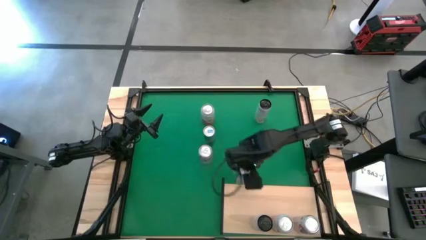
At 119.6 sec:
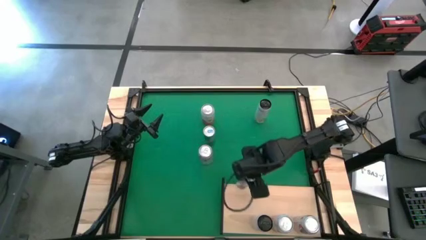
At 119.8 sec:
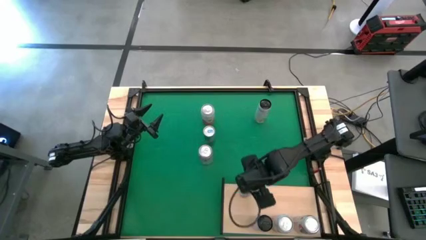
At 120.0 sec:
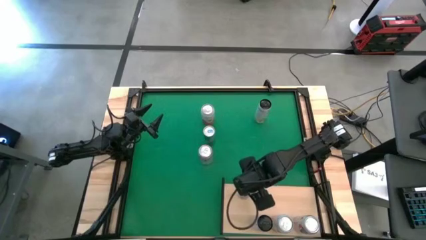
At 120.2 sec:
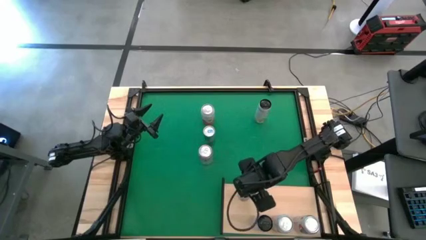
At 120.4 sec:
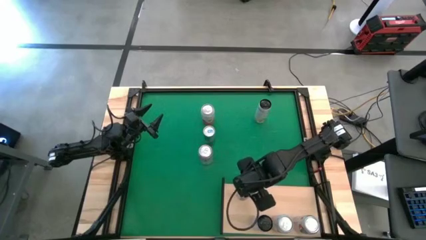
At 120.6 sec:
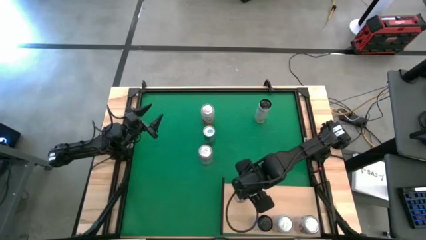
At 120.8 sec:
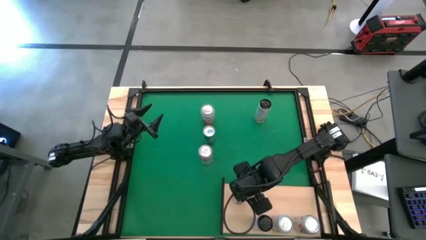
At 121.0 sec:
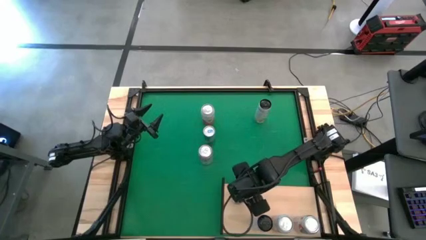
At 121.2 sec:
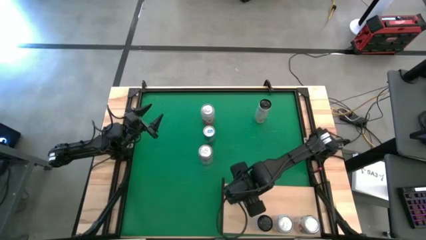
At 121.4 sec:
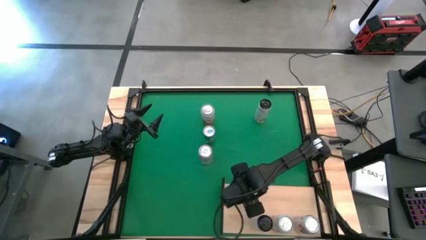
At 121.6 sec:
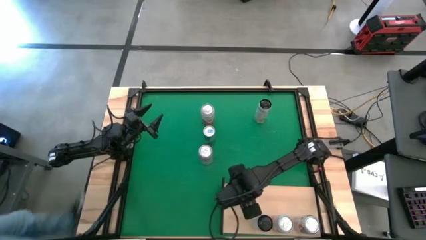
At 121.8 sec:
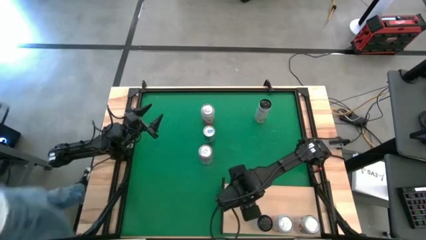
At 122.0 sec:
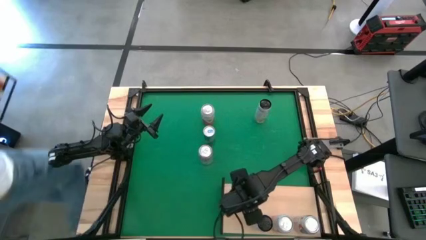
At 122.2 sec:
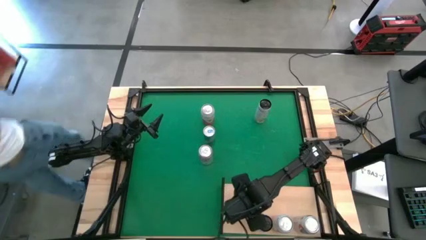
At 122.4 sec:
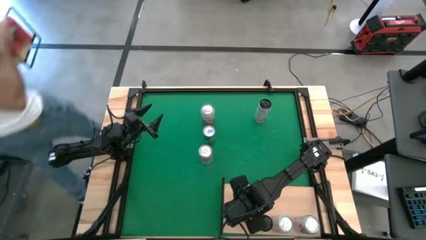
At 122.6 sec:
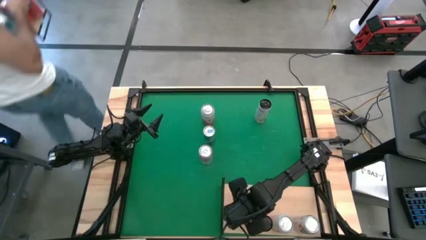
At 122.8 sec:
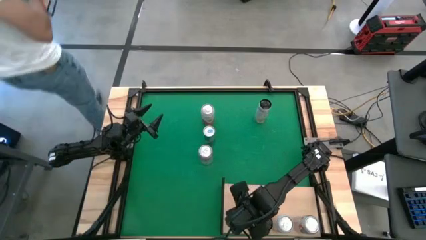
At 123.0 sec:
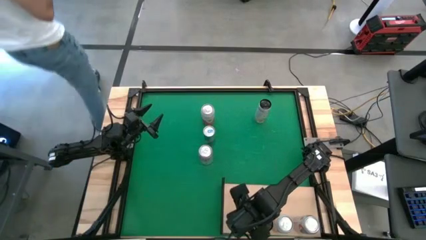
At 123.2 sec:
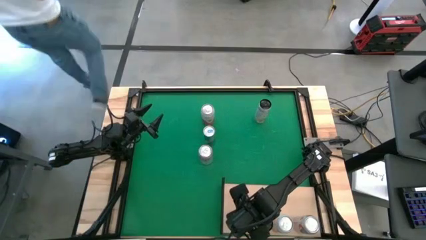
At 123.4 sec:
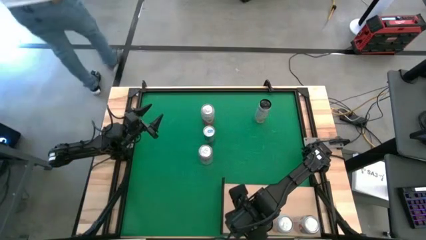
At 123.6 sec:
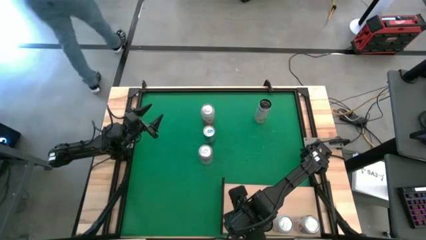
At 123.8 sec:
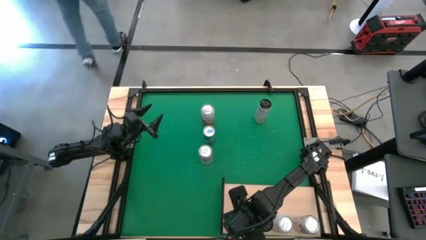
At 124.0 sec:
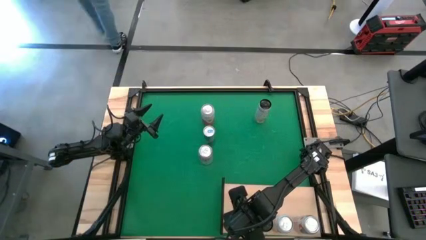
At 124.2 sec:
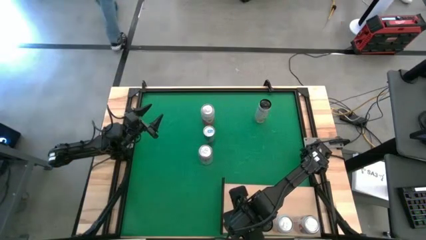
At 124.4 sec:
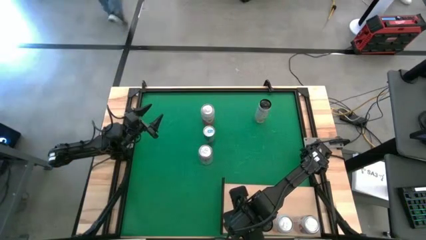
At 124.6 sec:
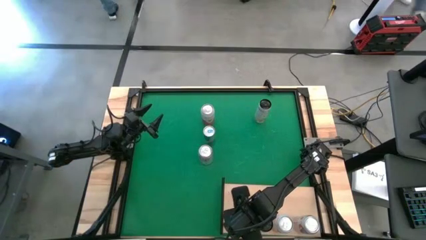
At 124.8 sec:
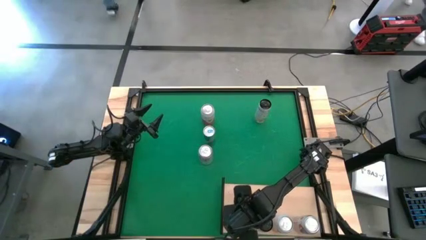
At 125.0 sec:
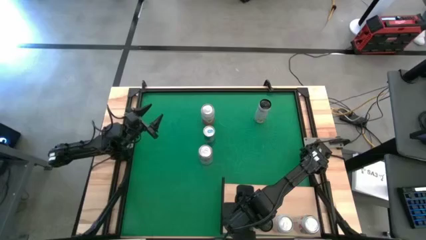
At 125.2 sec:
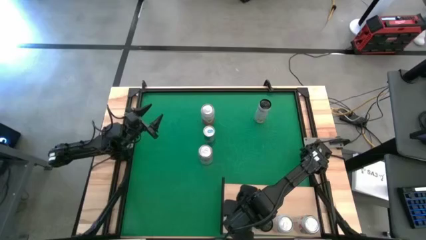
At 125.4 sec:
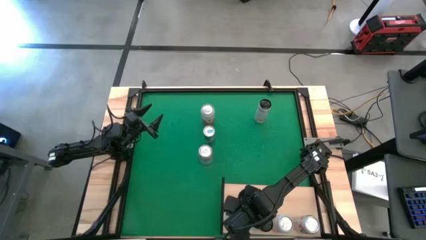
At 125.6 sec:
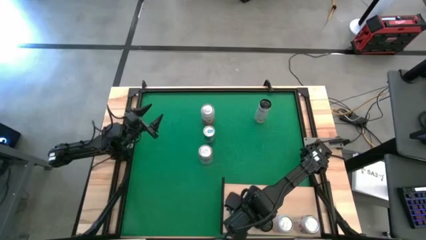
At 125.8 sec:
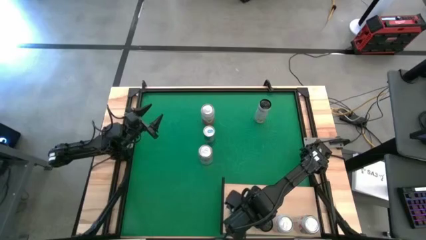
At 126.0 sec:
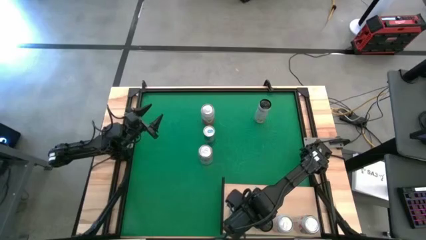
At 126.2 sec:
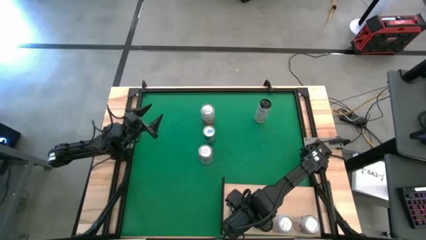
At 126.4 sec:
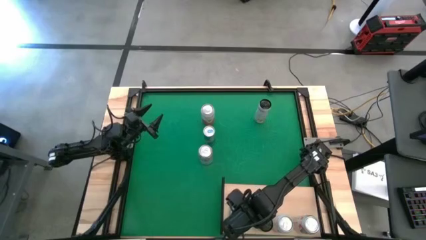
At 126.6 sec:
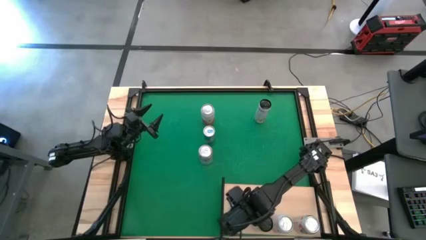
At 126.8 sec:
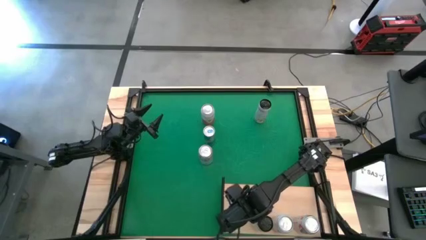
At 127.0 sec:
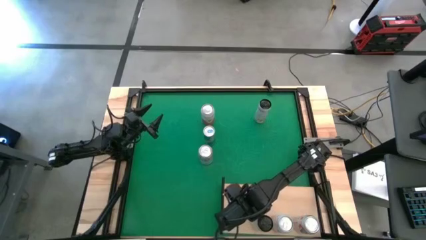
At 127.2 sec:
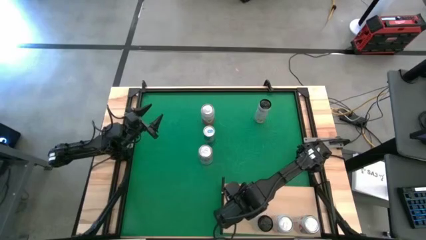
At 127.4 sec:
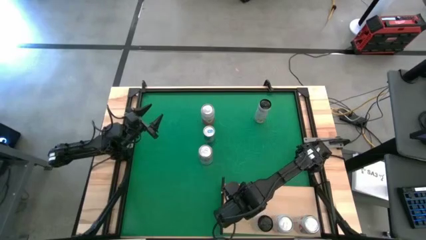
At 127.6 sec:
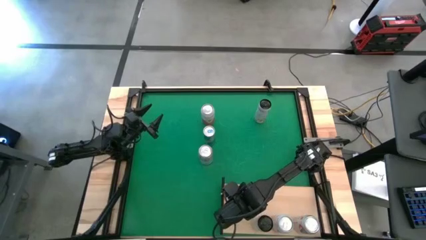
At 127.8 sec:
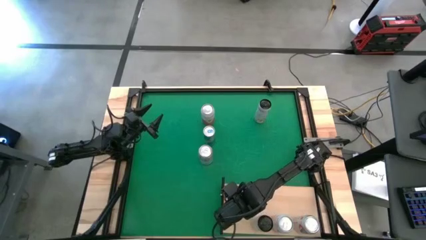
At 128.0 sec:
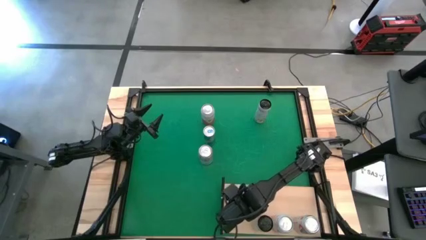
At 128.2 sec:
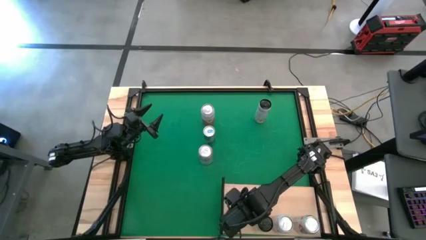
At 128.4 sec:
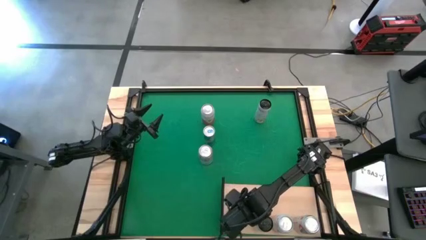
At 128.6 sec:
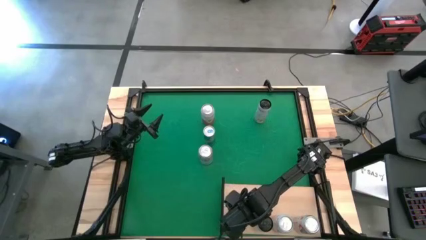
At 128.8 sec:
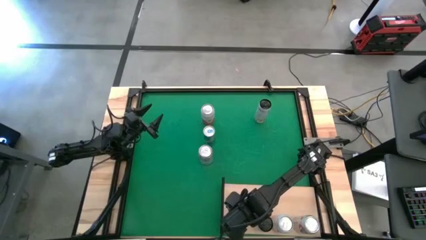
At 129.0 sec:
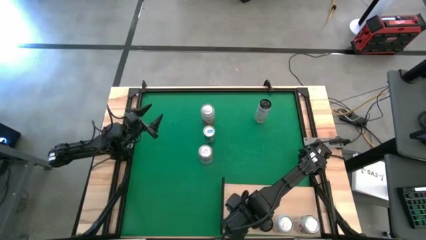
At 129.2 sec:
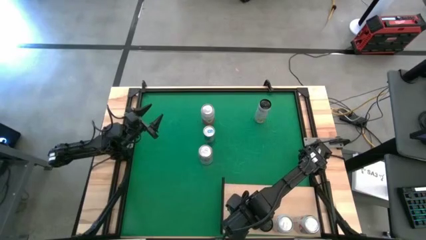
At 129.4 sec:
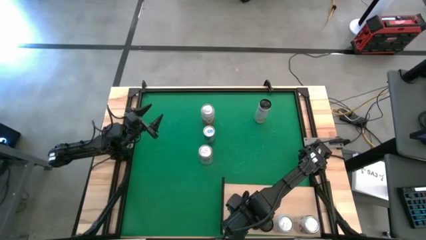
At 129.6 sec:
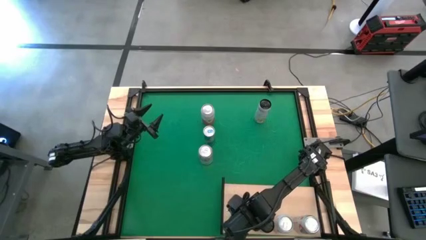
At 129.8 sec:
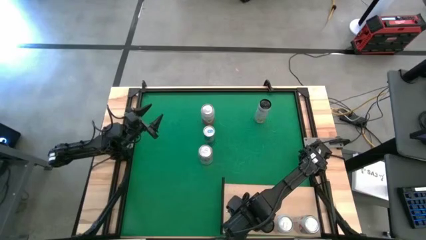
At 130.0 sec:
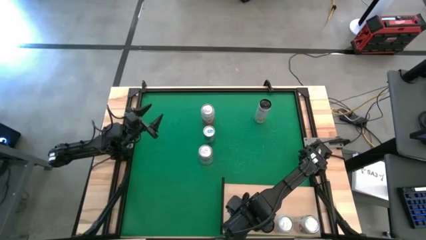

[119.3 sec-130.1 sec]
Task: Place canned beverage on shelf
Put the right blue soda can on the shelf

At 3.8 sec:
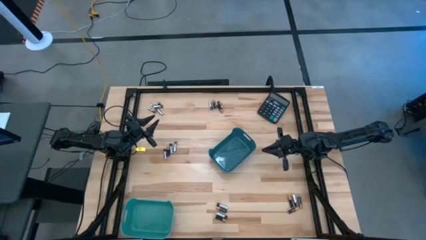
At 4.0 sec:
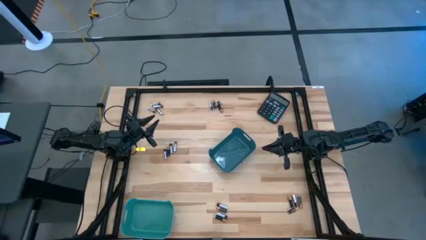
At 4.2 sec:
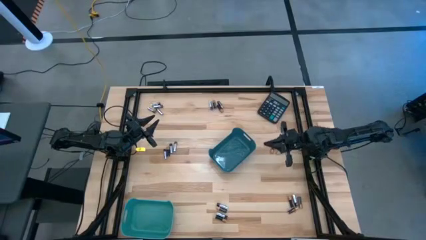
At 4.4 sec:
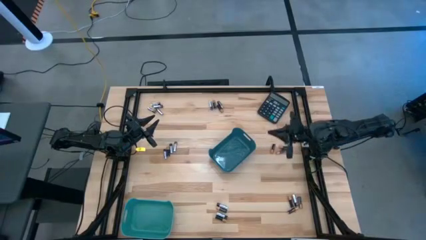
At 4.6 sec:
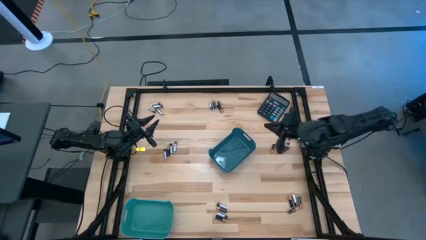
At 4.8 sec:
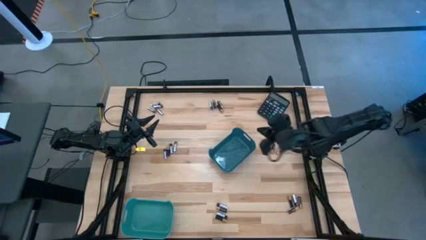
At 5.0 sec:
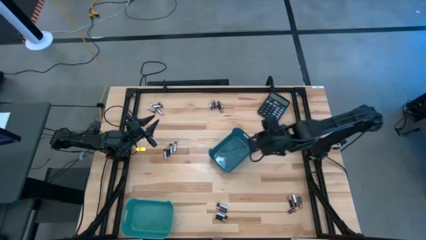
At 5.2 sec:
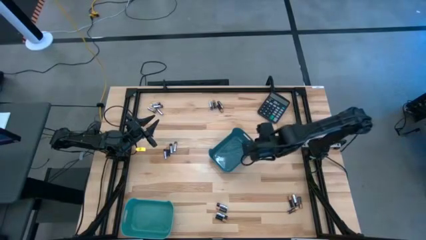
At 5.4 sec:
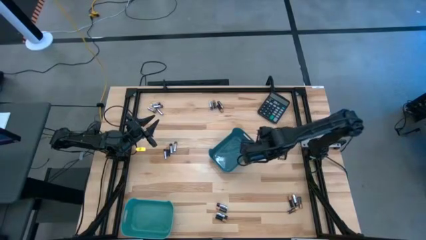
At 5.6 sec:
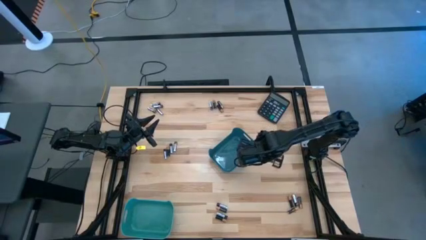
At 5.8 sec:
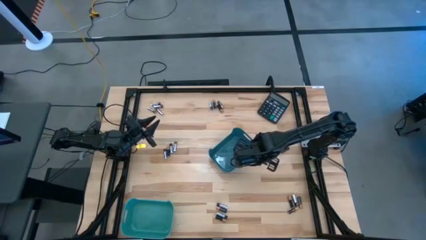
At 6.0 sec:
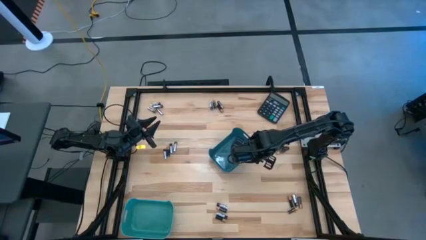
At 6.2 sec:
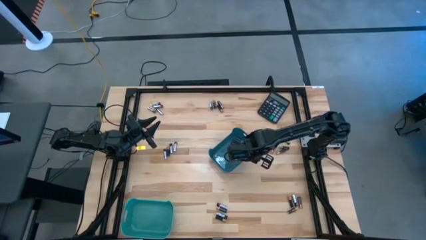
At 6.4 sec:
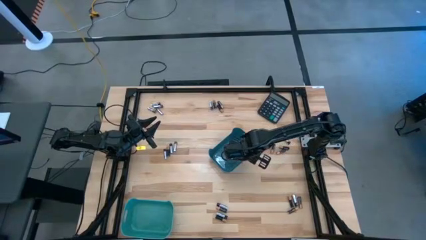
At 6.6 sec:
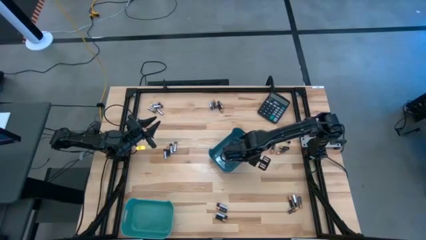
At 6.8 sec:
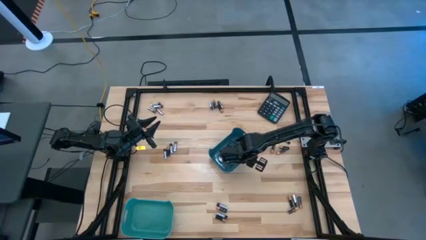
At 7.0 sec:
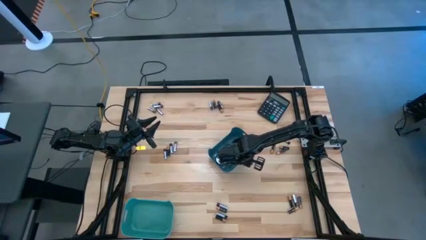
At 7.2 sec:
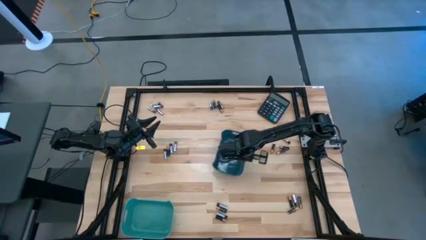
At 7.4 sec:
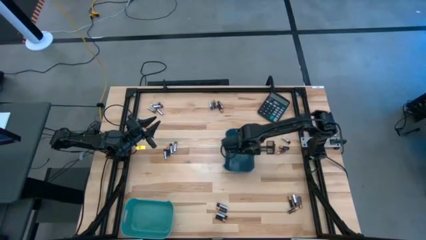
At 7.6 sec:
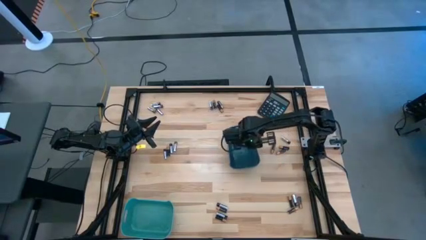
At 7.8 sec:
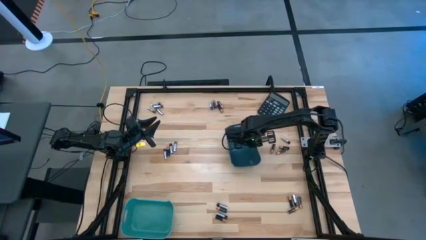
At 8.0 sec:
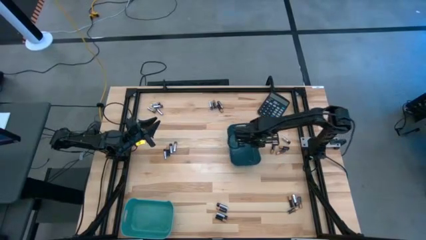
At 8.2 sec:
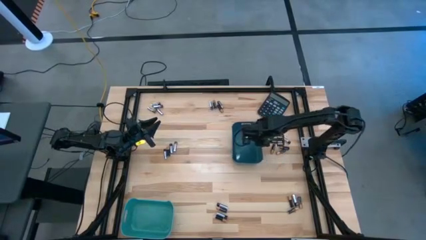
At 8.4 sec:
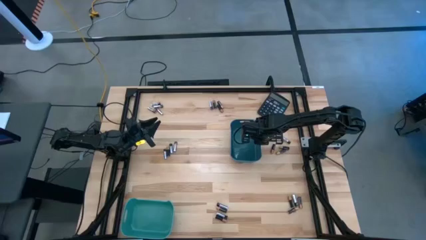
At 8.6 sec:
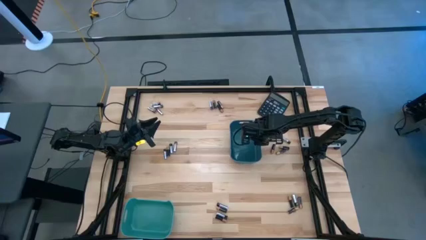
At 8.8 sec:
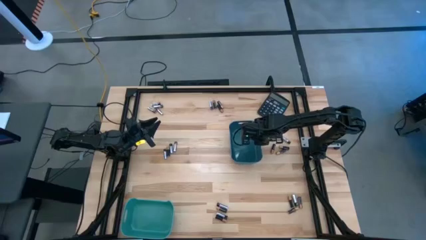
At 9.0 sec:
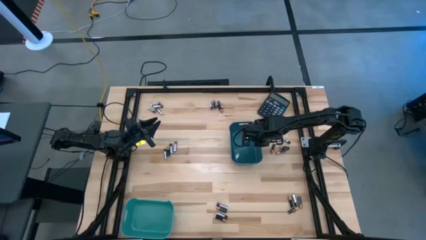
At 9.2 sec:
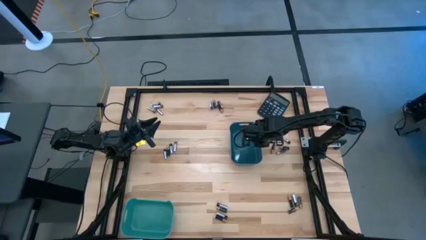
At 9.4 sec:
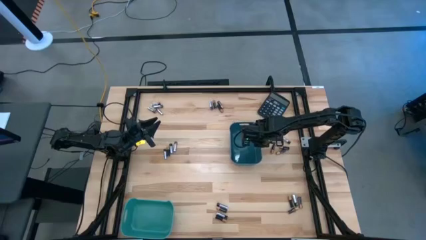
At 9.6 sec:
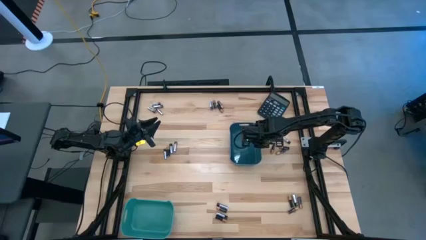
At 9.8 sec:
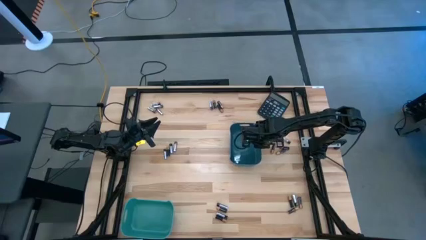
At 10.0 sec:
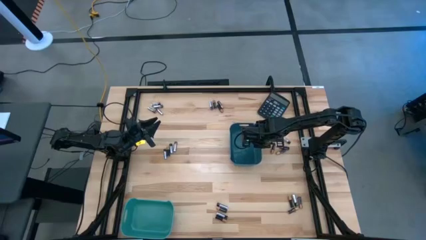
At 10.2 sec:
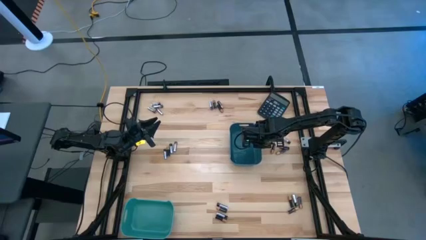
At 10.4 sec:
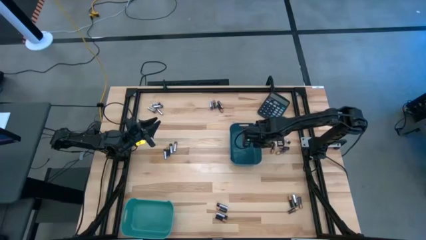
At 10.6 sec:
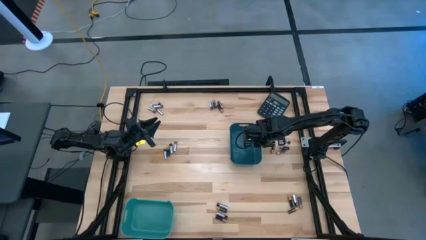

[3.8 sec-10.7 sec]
Task: Sort batteries
Prepare the blue bin on the table
